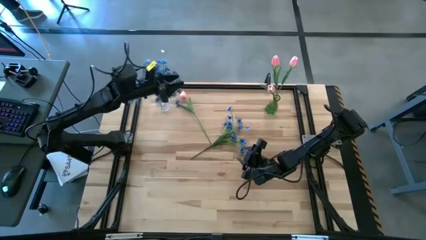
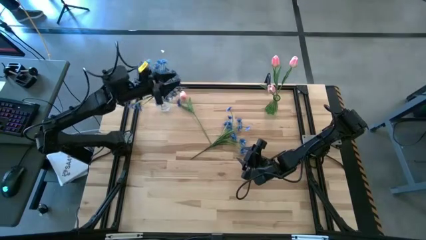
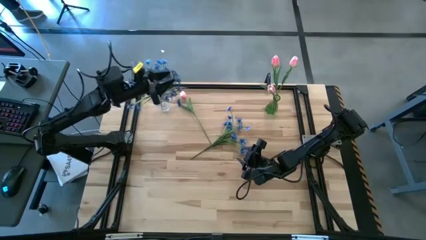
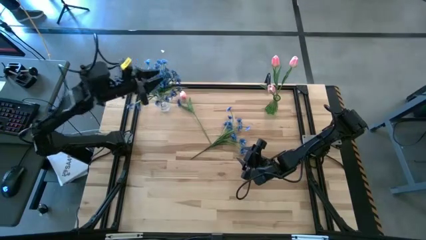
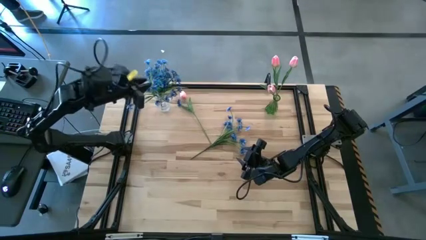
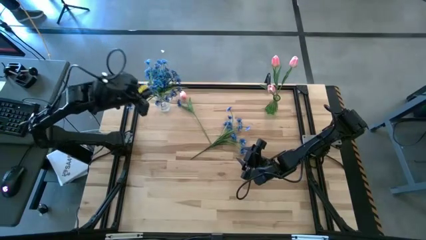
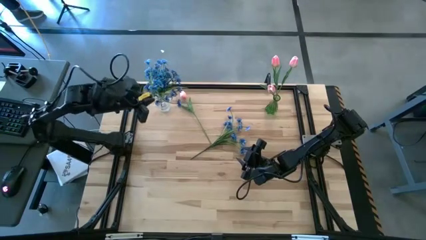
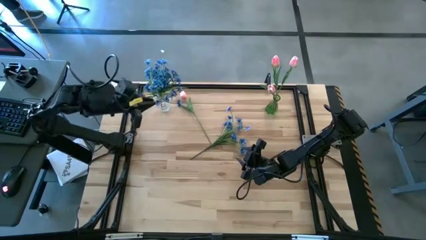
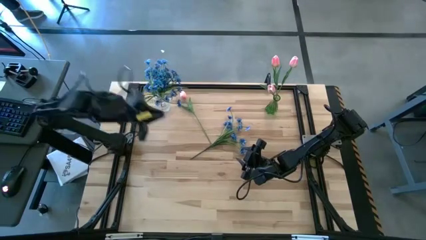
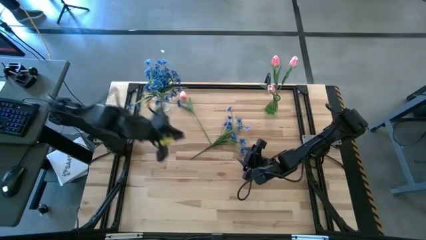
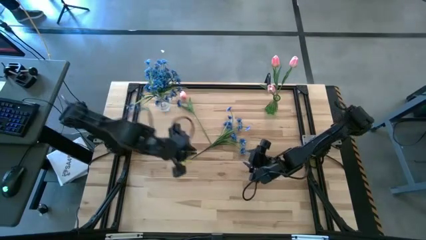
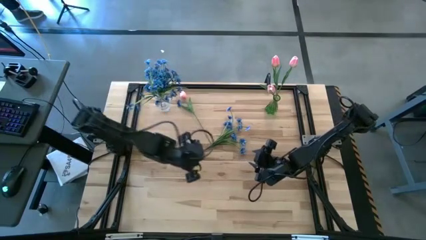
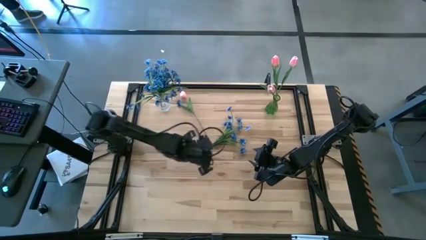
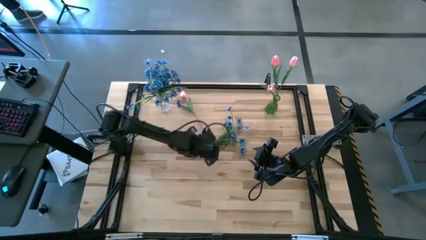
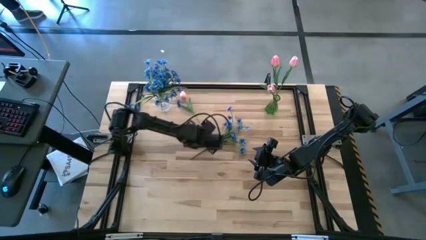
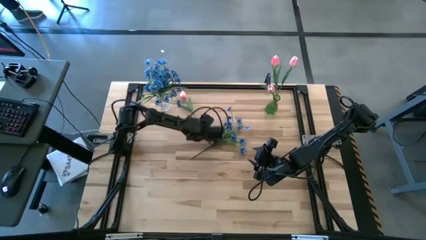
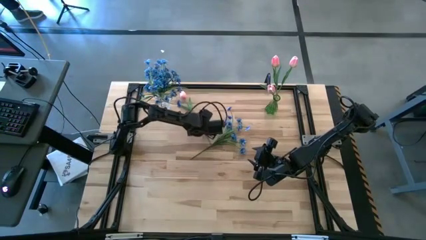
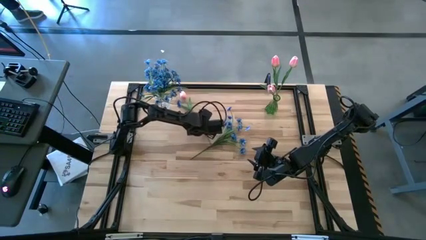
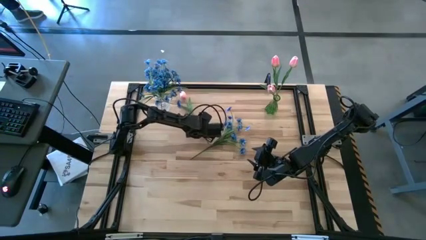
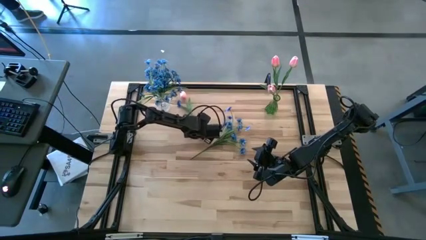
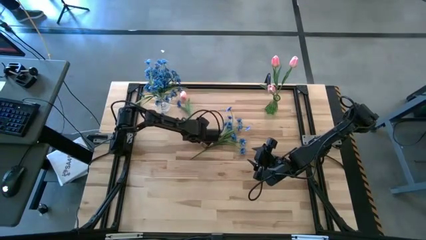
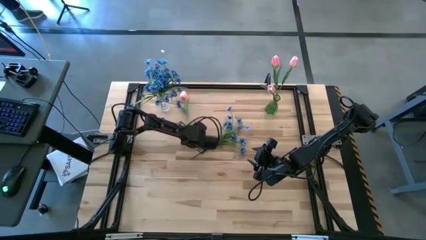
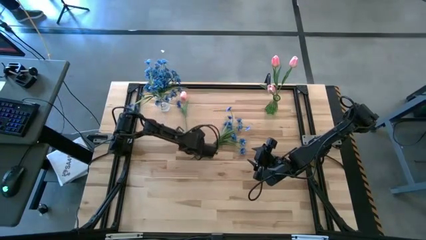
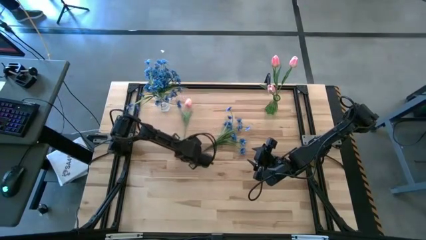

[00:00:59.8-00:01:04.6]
Task: Sort flowers into vase by color
Put the pink tulip in the green vase

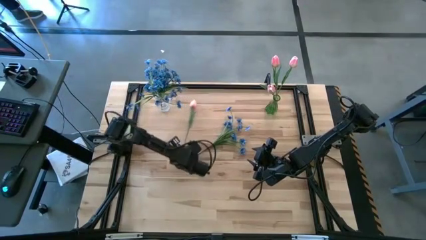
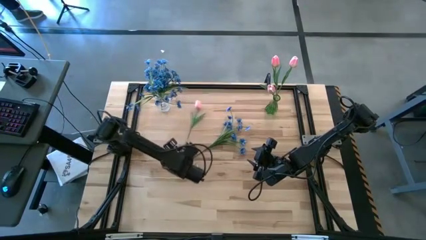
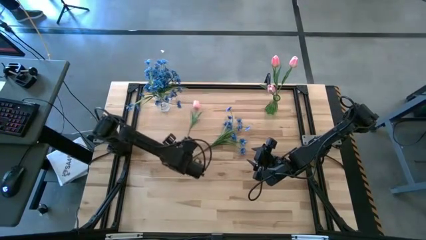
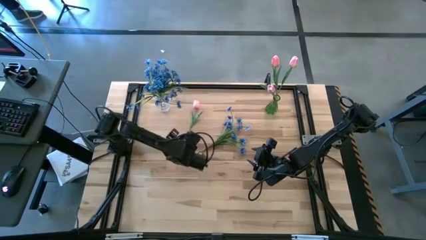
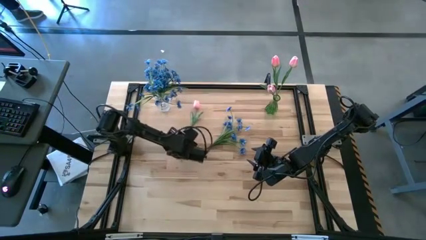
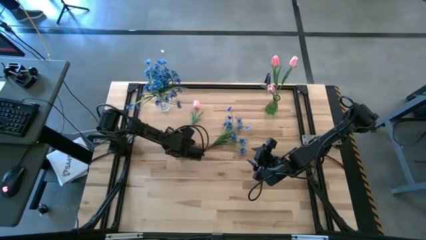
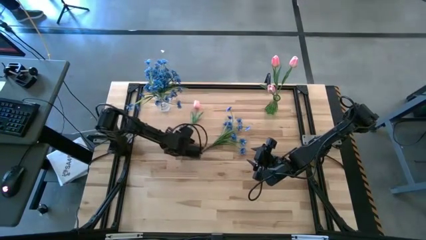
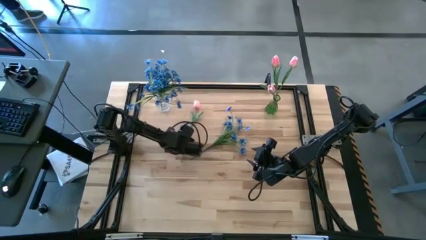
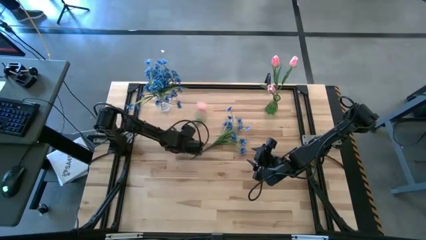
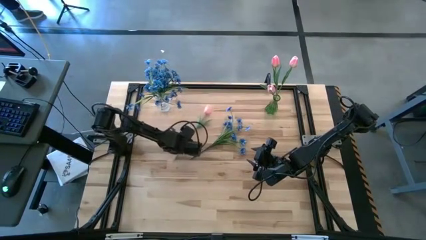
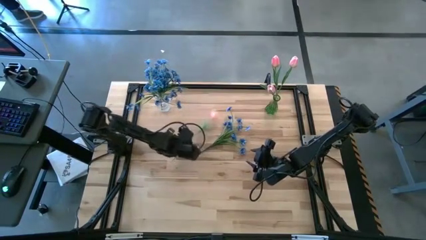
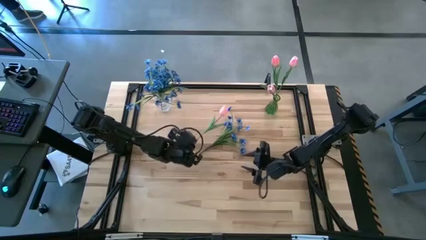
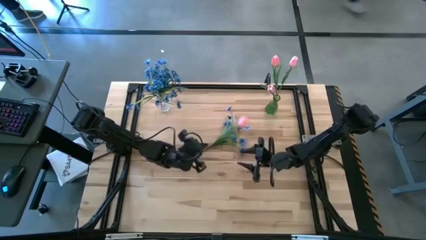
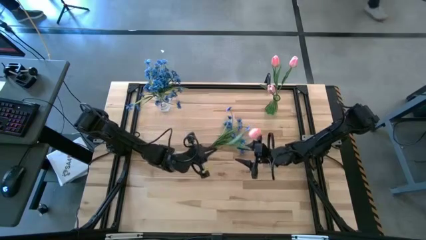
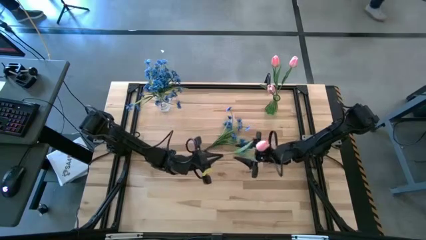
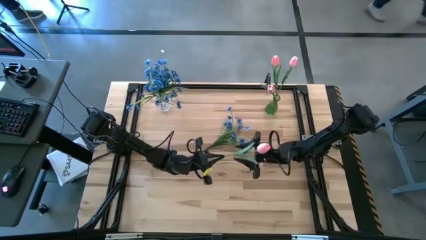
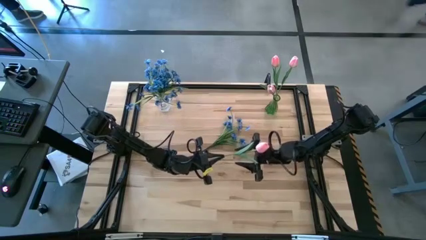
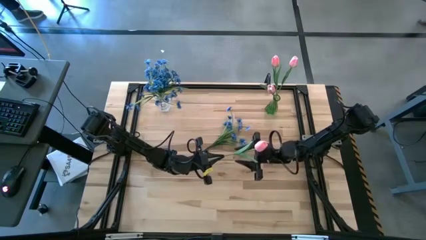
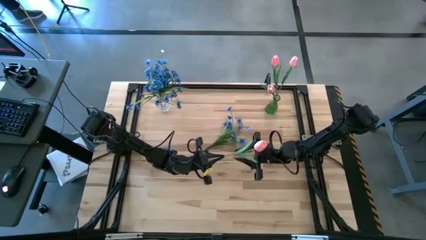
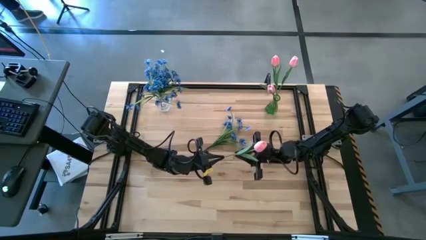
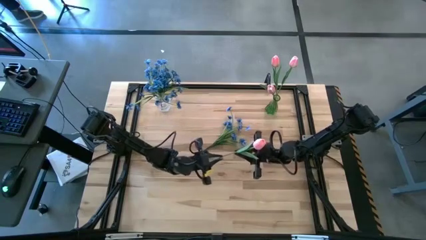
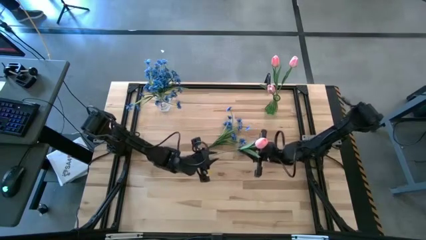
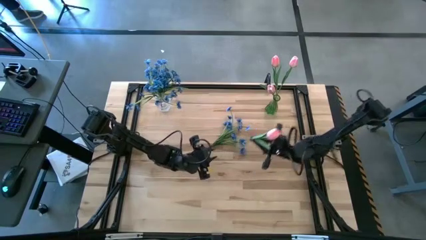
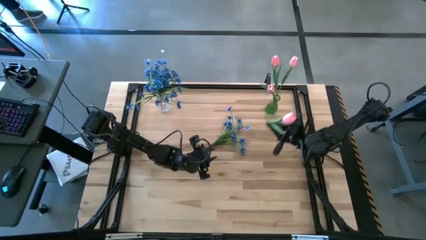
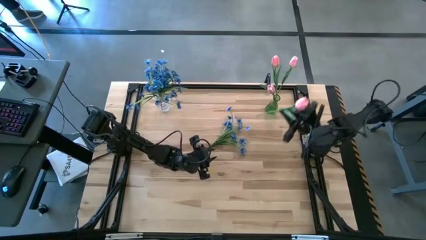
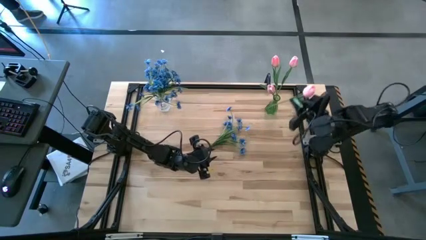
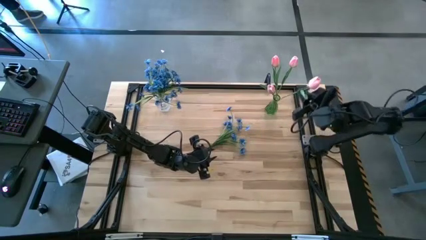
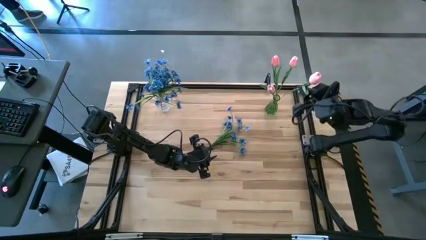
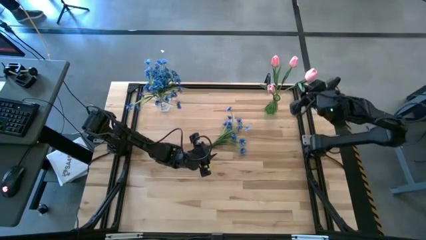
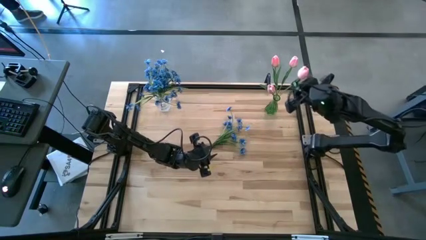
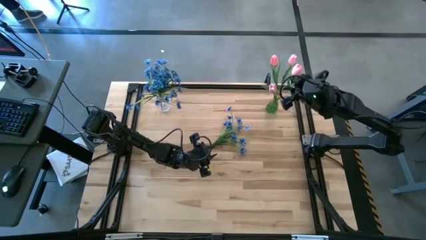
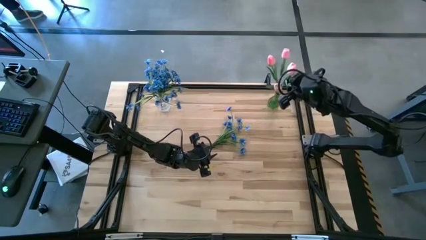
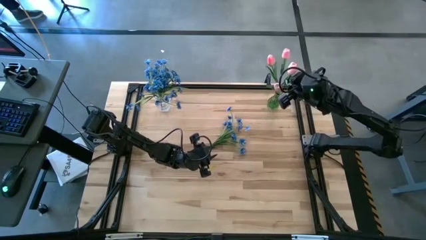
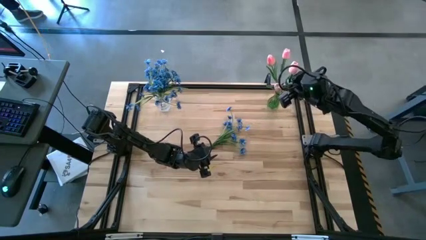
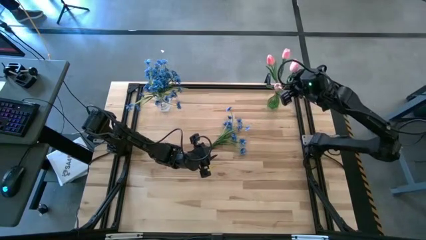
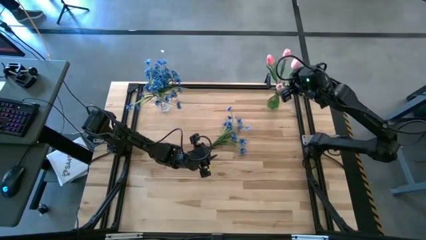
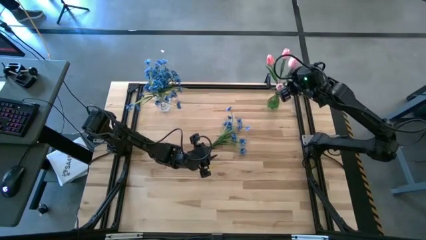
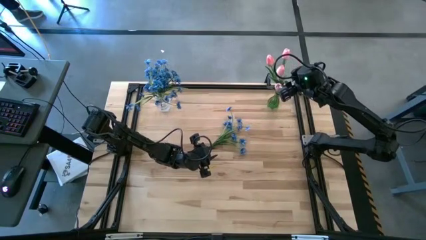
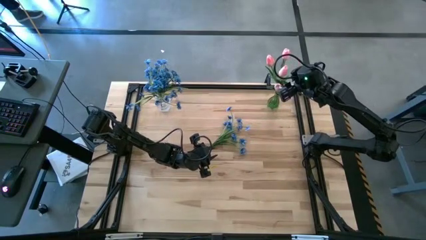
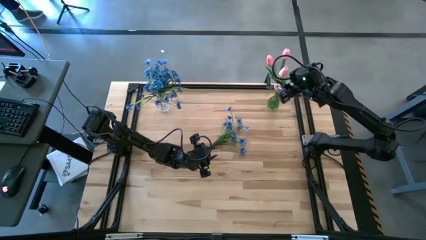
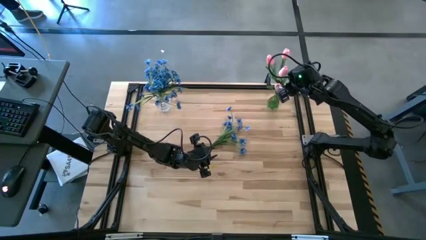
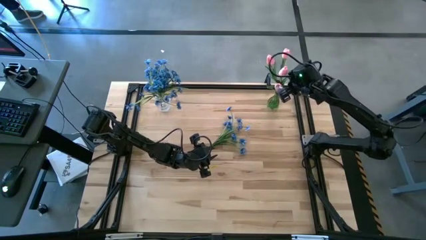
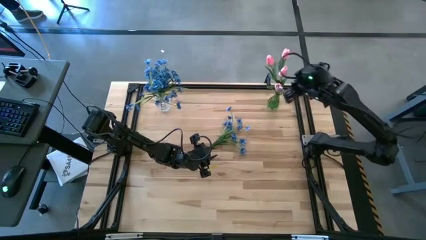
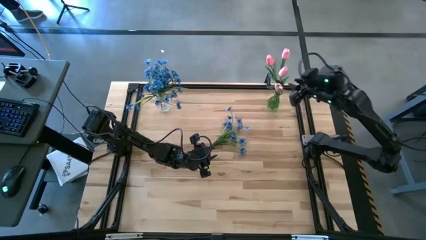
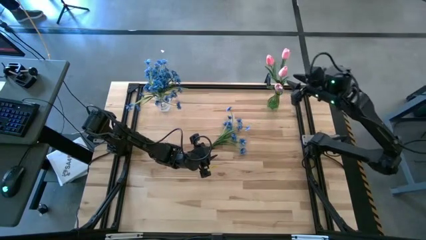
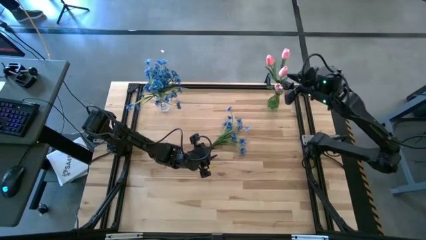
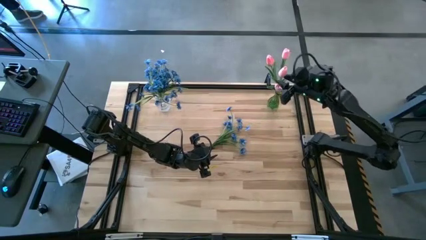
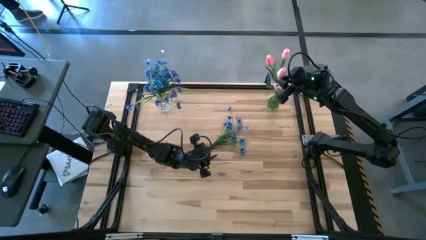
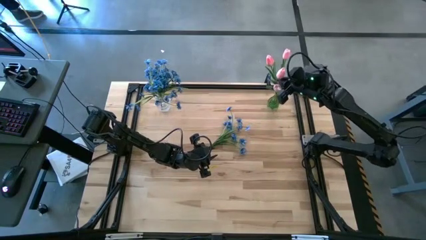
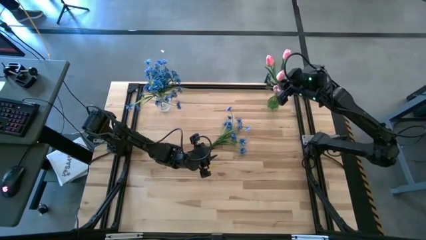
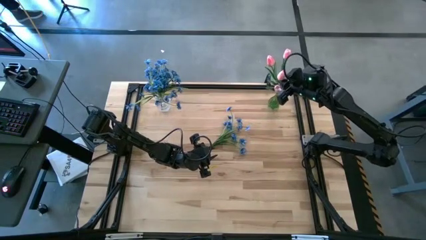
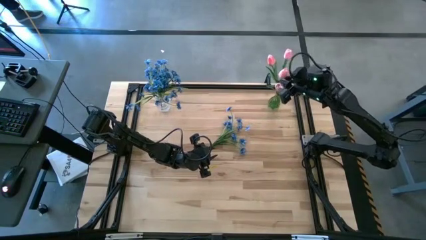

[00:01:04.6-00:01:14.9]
Put the pink tulip in the green vase

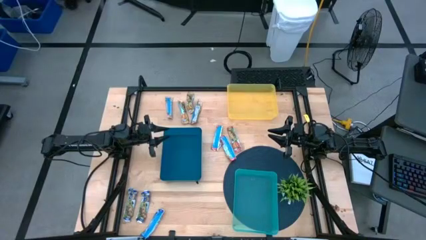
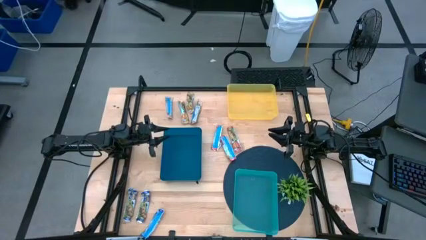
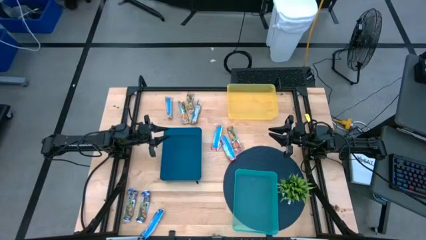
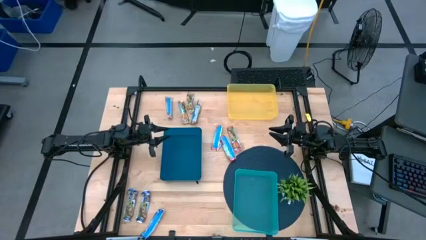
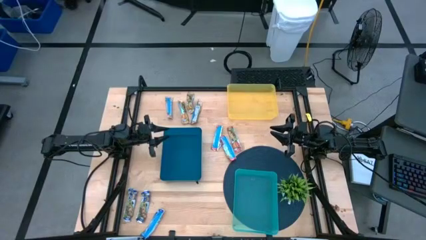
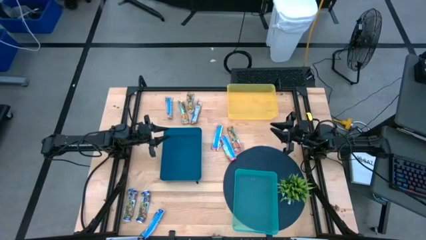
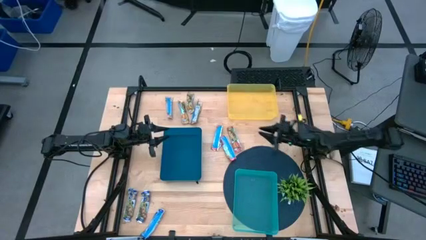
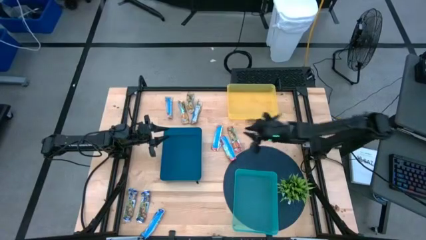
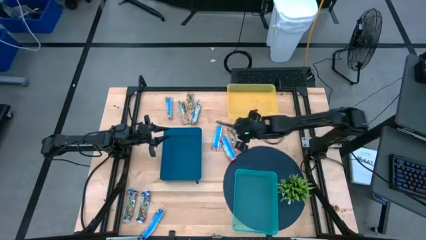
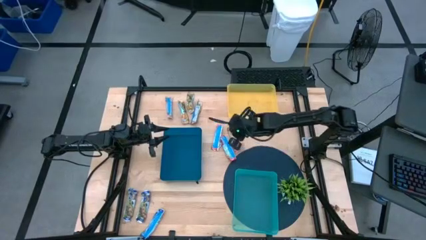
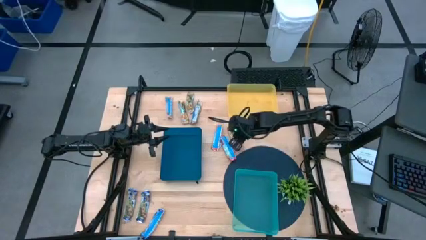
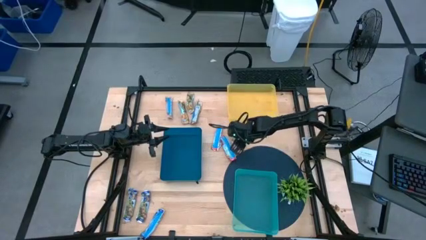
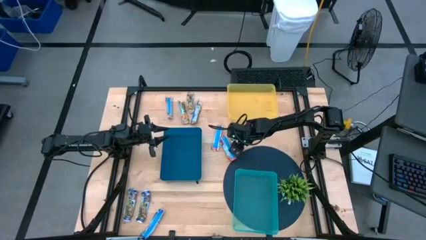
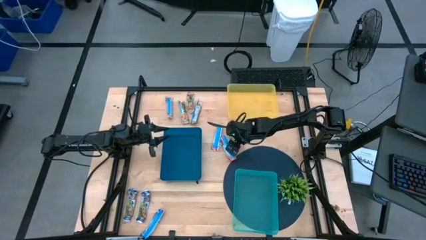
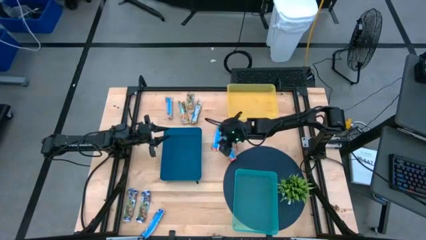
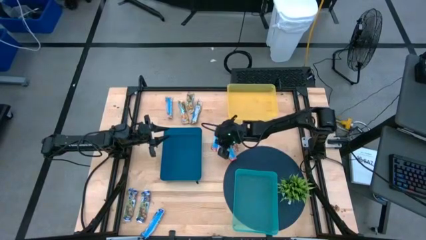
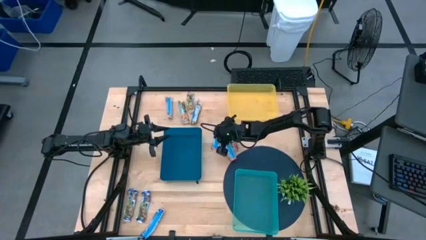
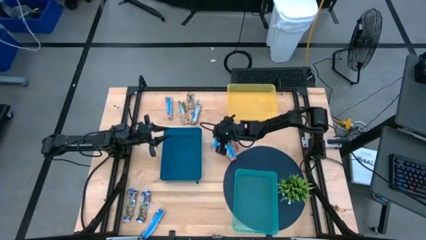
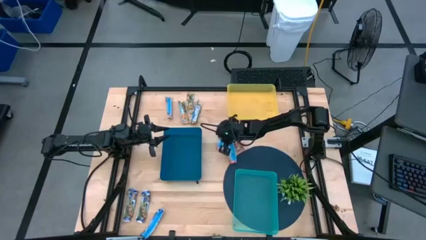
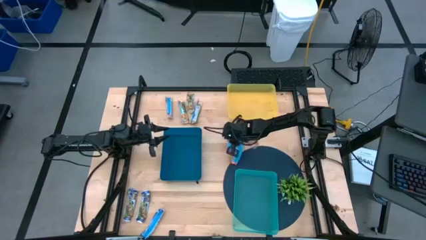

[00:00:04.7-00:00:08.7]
Task: Pick and place Granola Bars by type
Adjust the red granola bars
